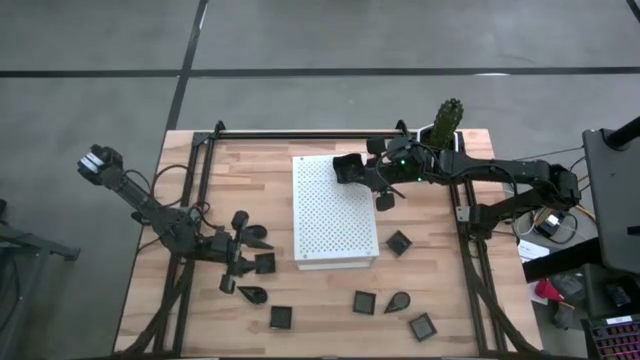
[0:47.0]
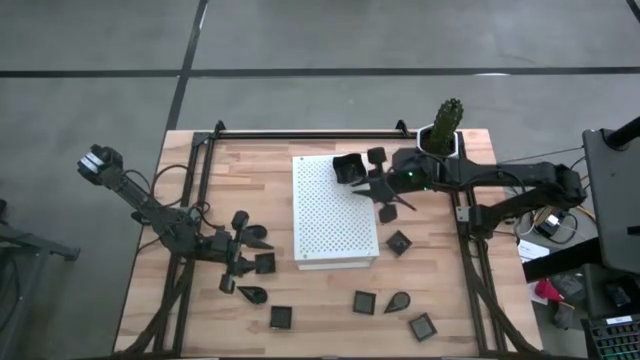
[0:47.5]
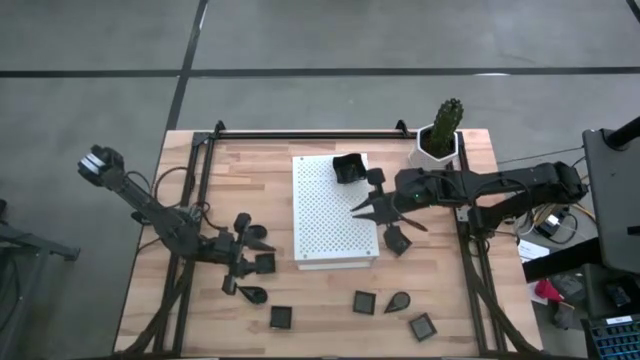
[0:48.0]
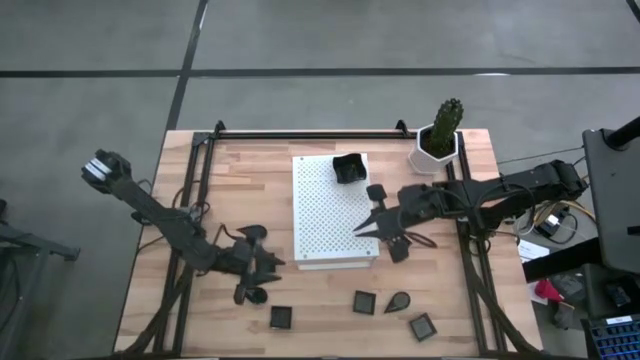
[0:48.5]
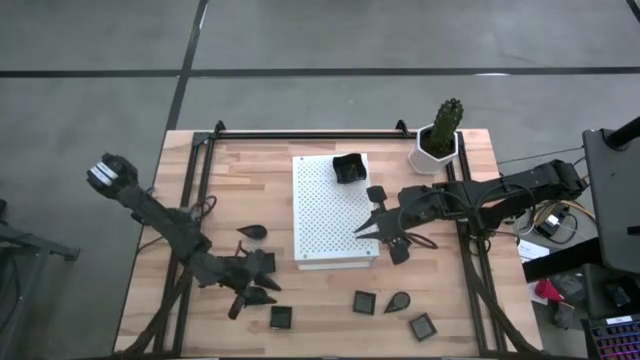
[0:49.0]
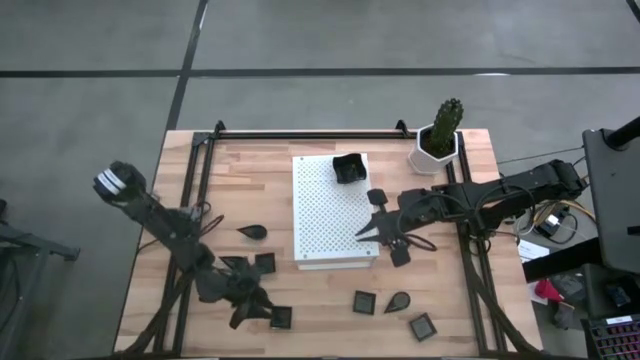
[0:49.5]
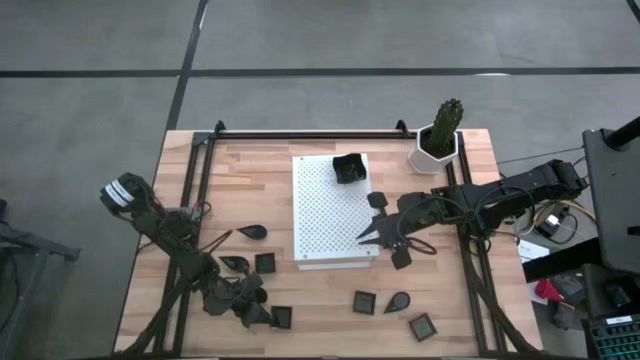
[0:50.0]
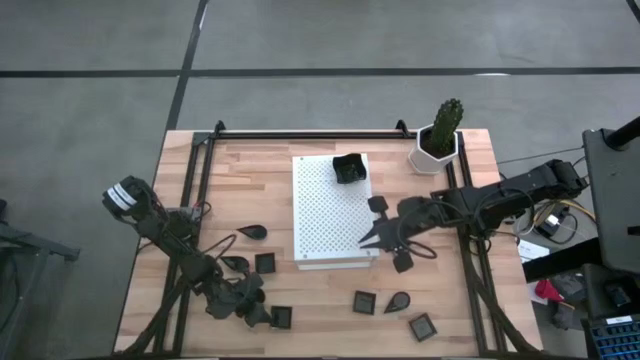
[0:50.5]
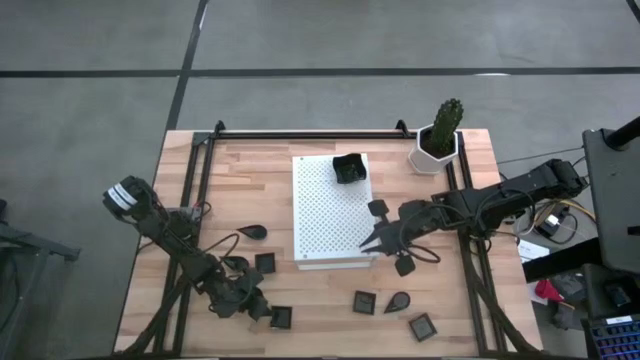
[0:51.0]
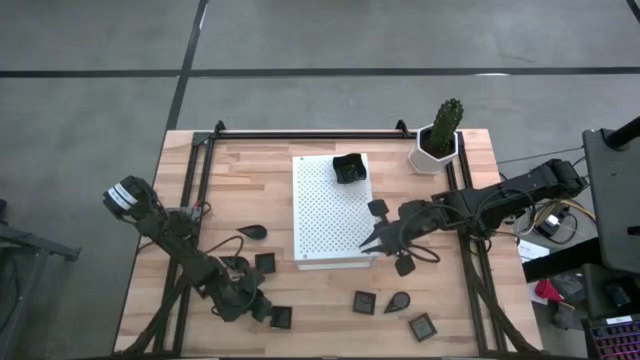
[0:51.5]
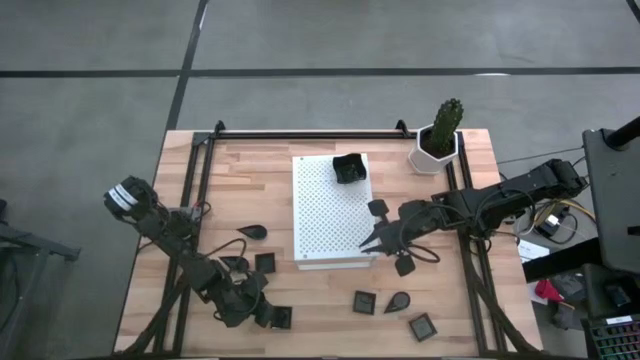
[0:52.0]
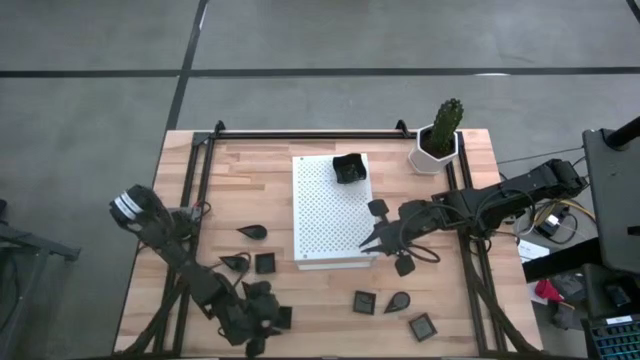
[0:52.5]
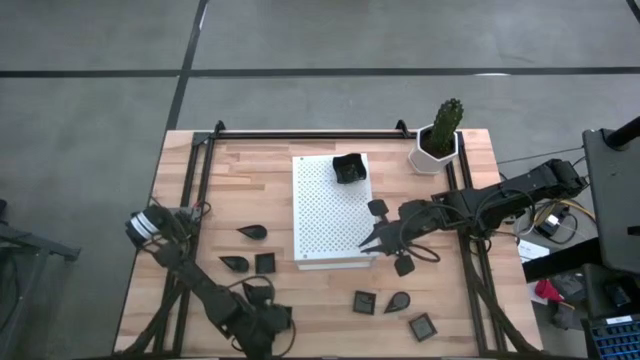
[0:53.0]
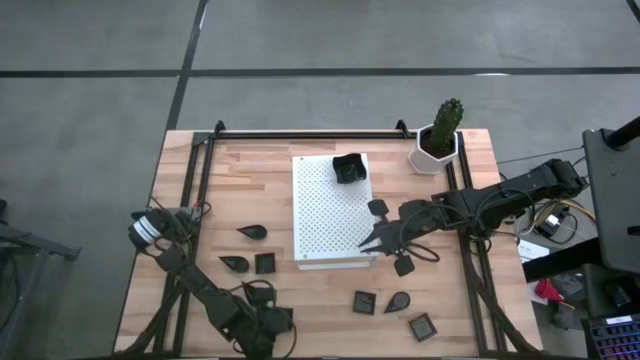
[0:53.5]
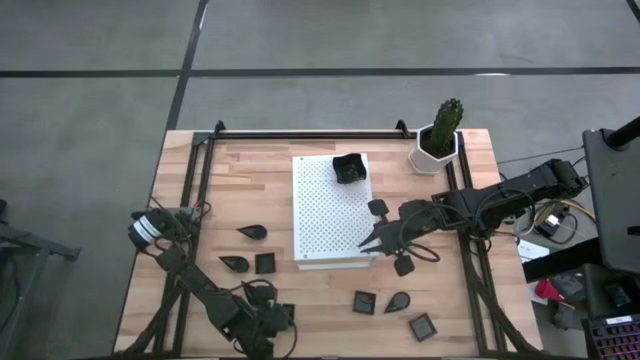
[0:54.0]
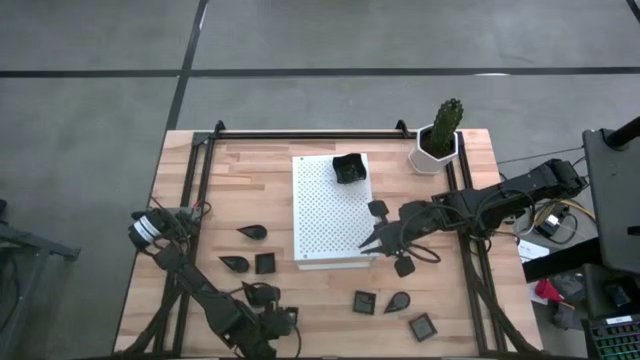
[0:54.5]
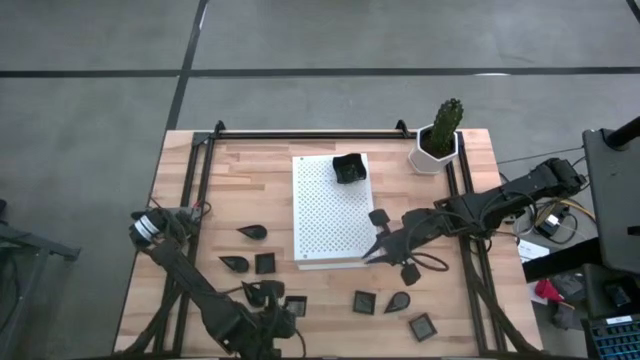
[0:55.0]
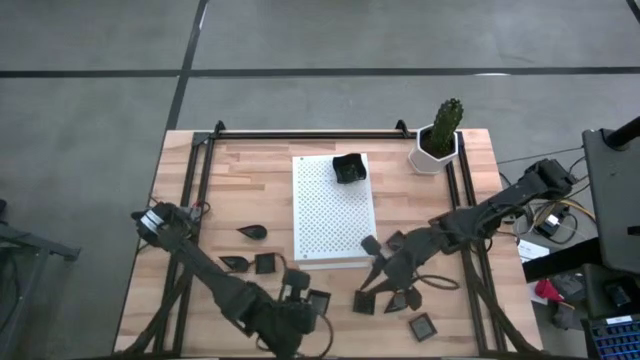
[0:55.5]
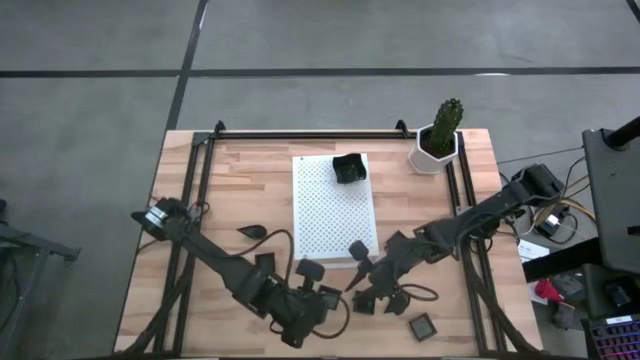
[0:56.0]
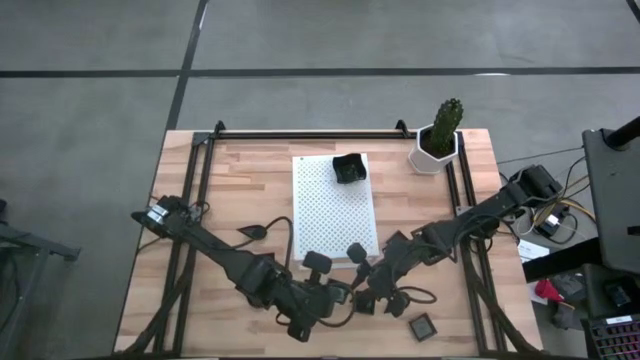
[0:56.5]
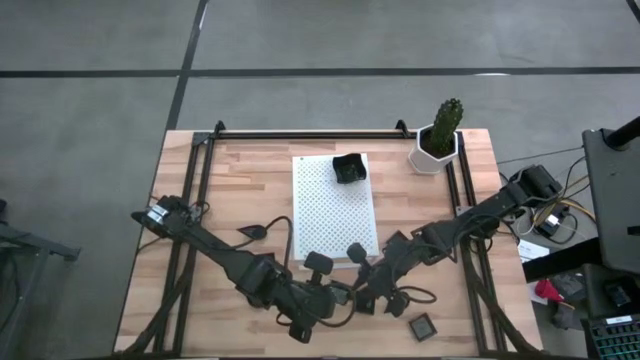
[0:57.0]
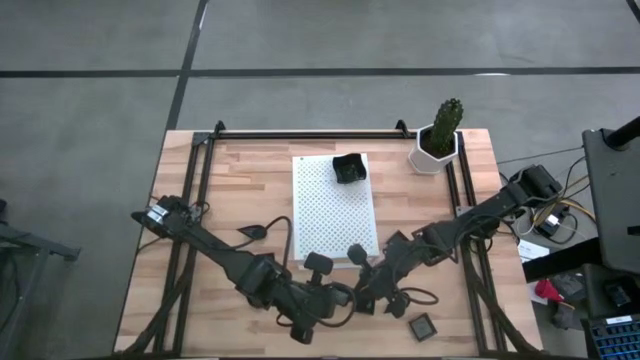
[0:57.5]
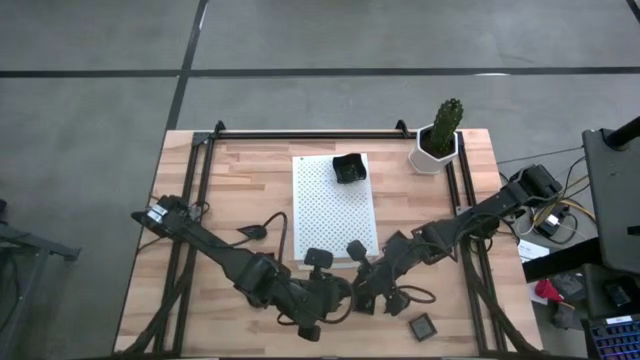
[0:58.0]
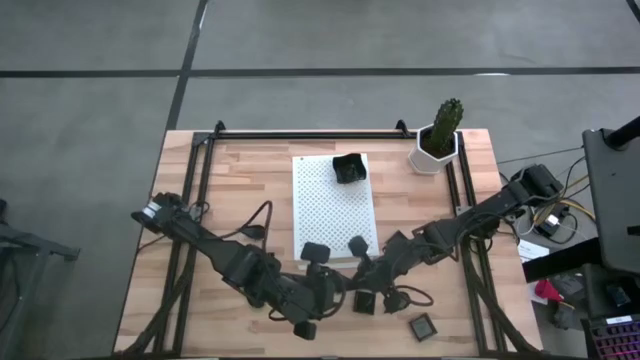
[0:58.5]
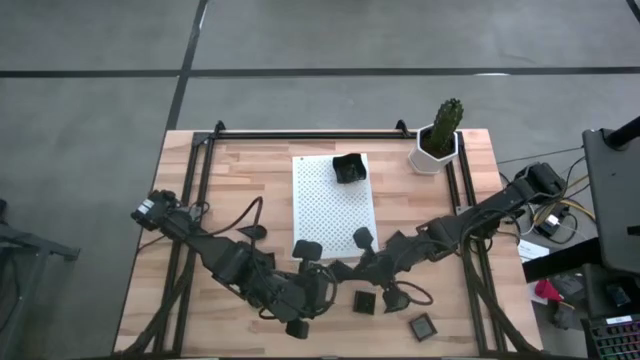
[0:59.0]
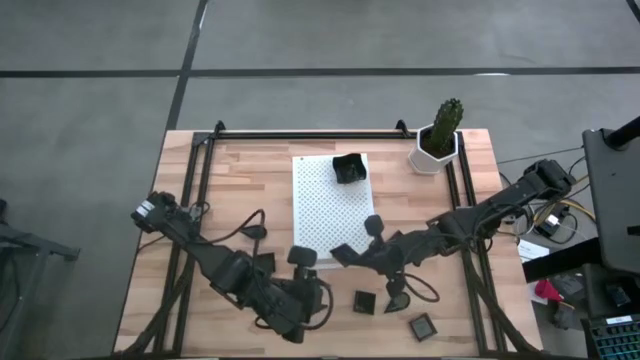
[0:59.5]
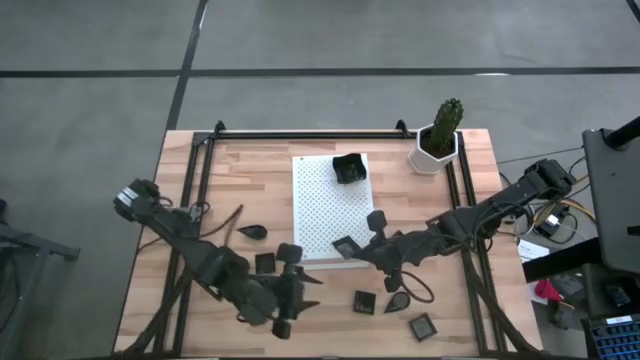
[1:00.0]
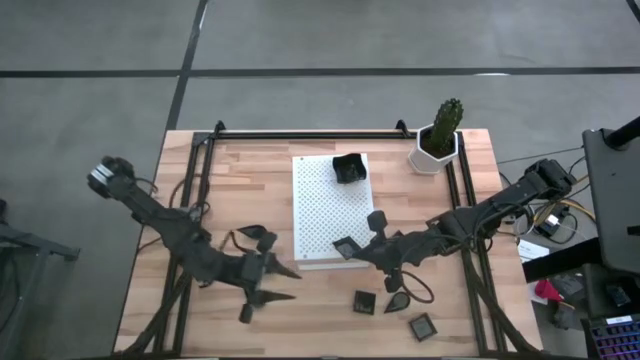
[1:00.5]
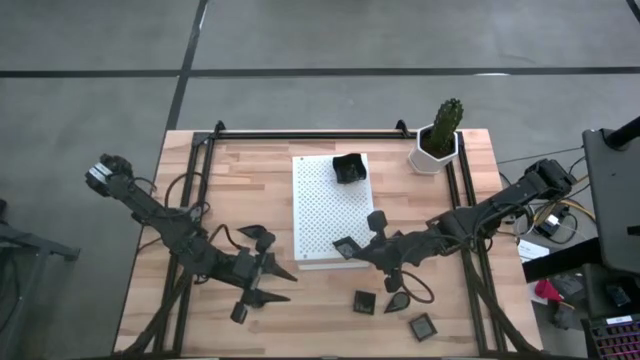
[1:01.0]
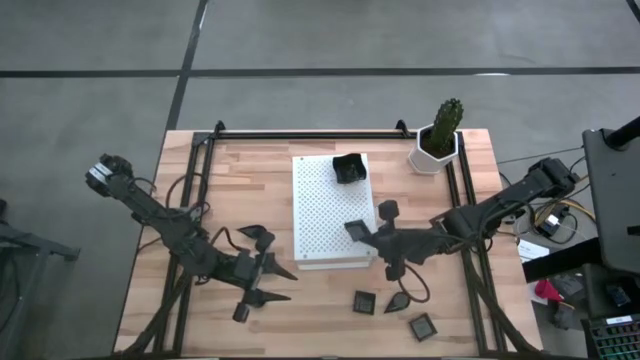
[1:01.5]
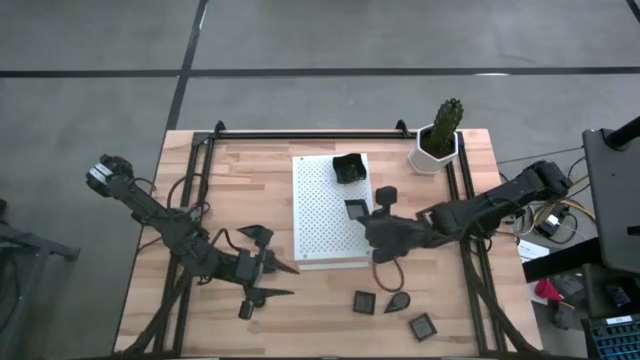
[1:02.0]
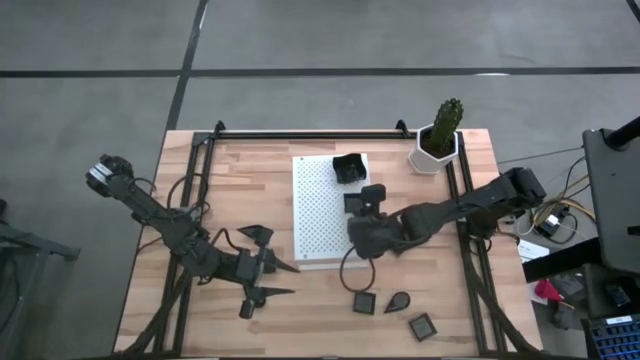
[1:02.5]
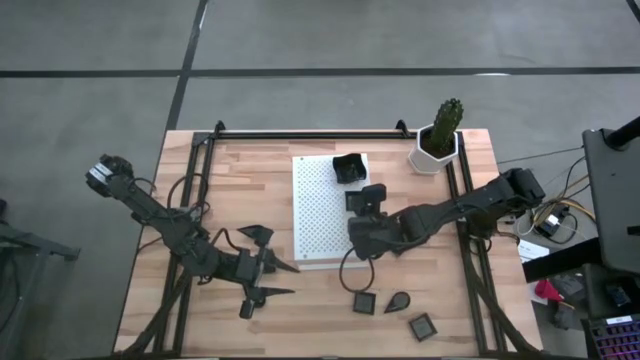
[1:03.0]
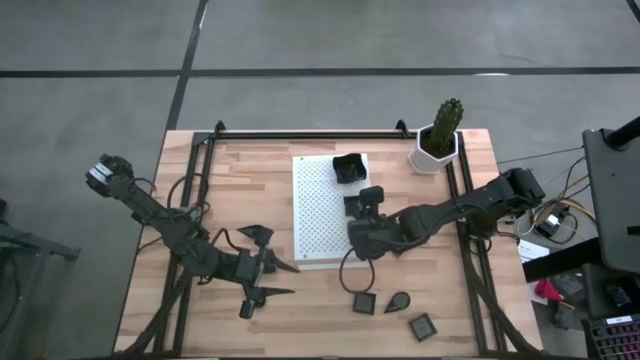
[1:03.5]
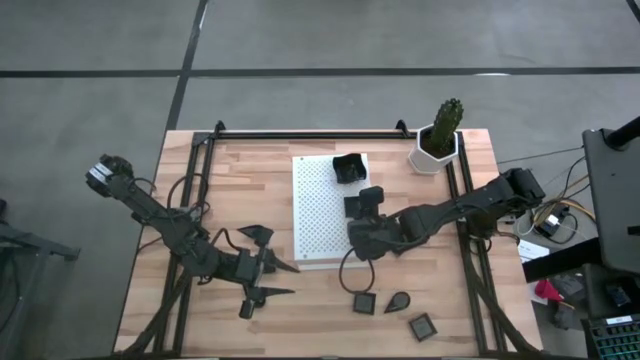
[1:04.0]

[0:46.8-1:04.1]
Task: Pick & Place Mini shaped plates
Put the black square plate on the shelf

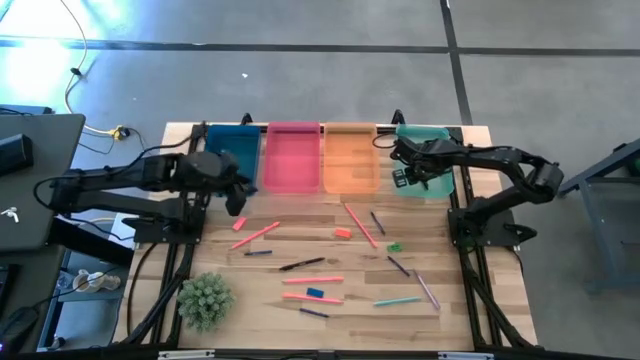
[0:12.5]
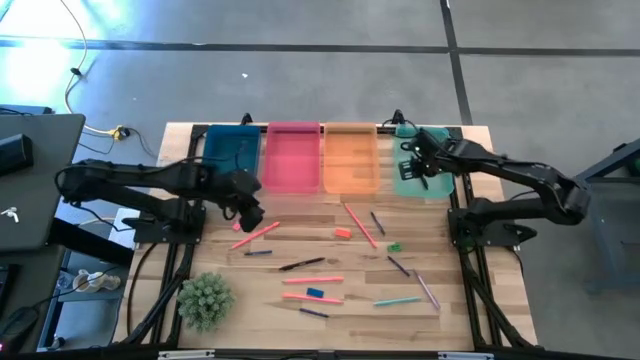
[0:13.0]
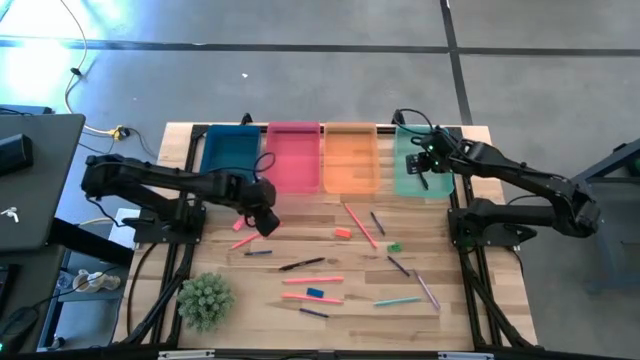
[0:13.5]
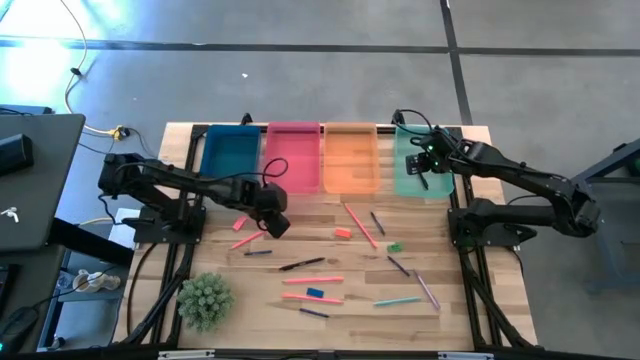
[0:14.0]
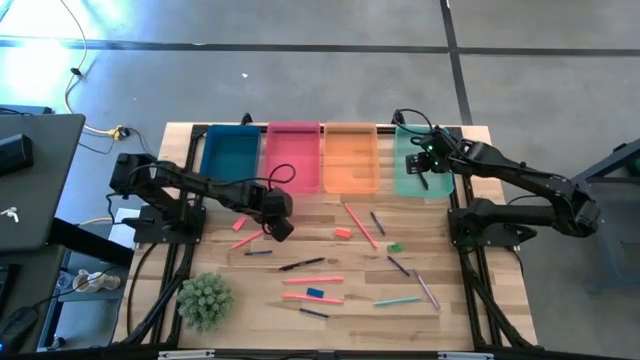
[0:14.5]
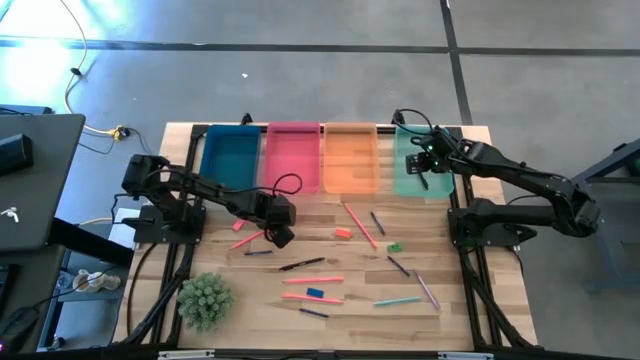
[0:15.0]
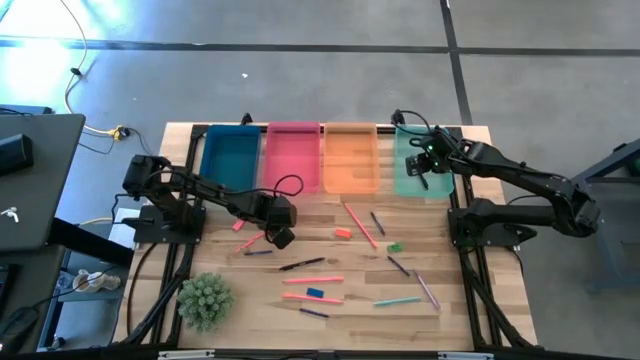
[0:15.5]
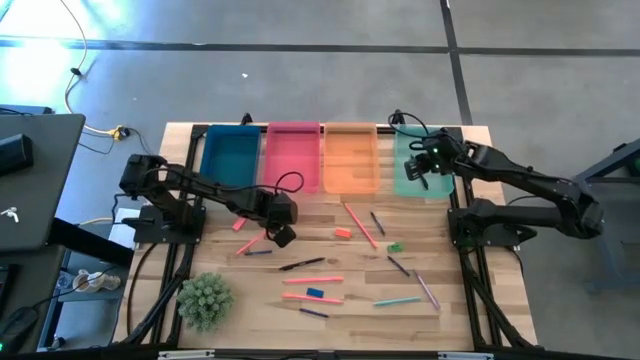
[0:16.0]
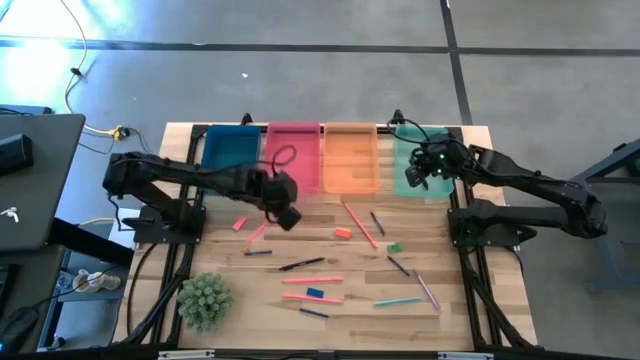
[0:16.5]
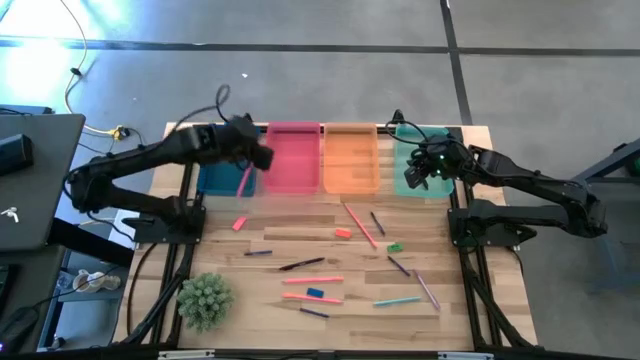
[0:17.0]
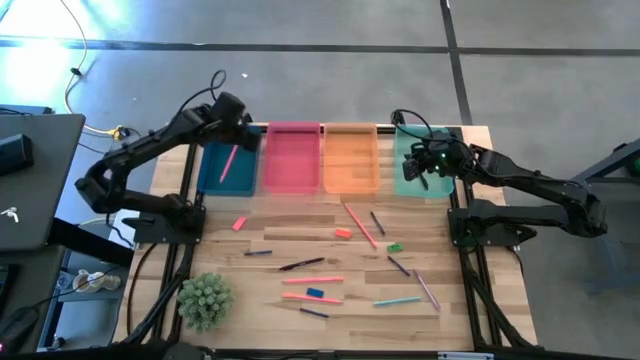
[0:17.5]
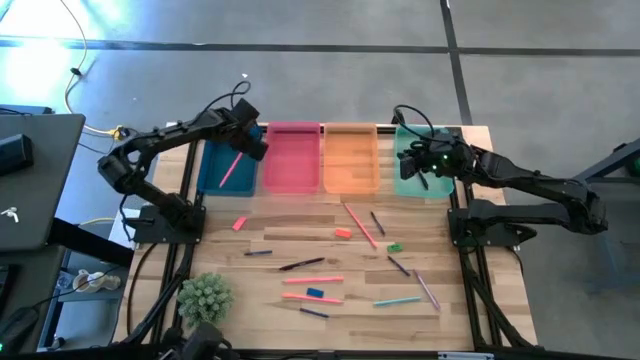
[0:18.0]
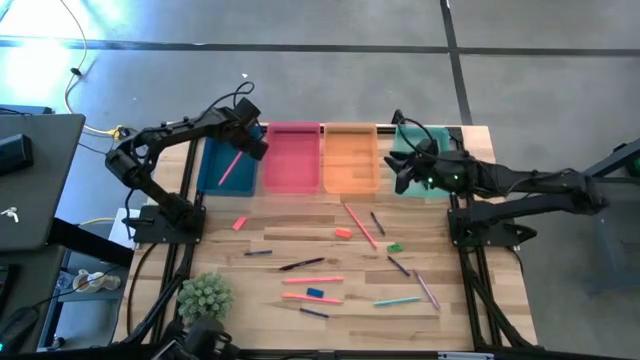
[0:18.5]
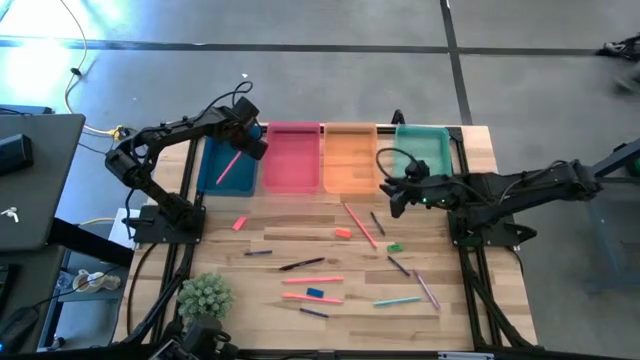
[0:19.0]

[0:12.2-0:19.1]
Task: Sort crayons/erasers/pens/pencils in bins
Put the top left pink pencil into the blue bin
